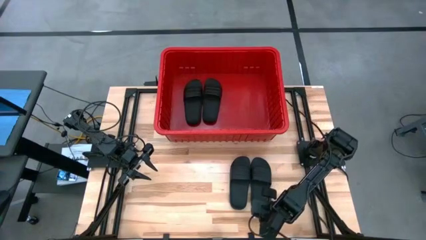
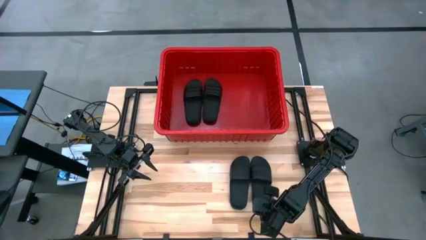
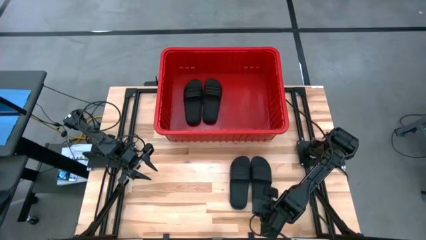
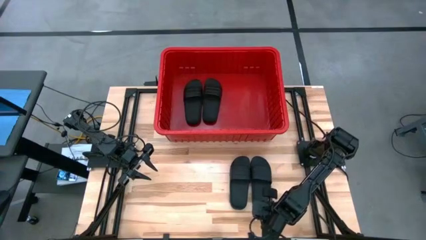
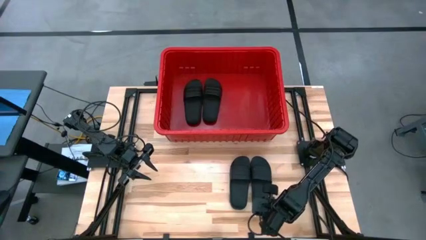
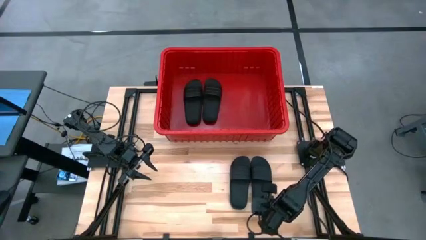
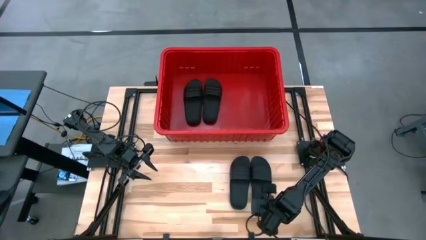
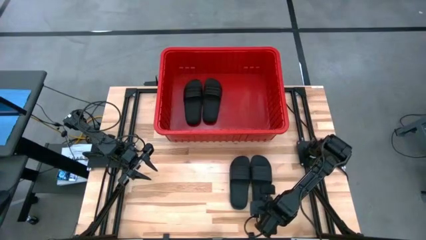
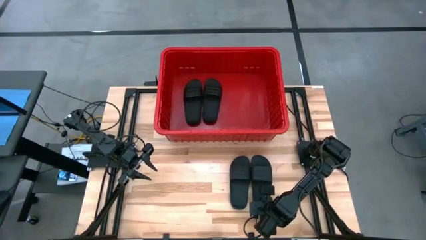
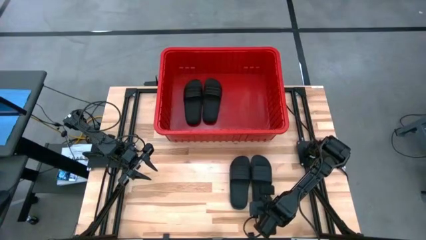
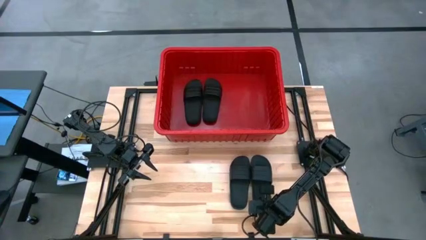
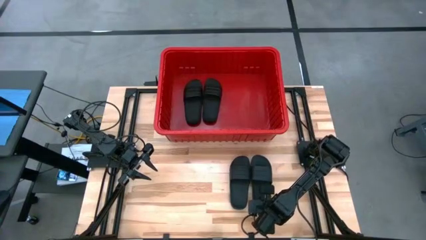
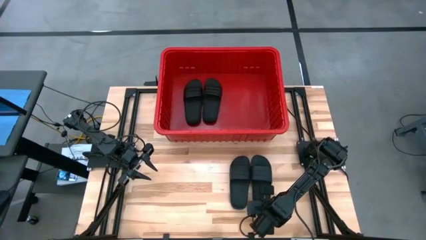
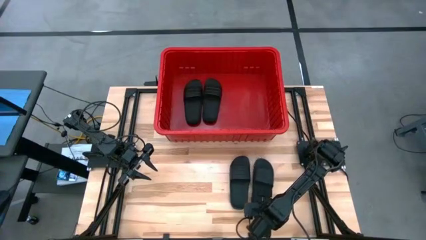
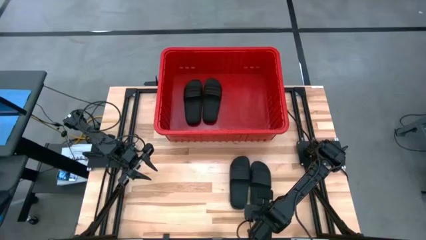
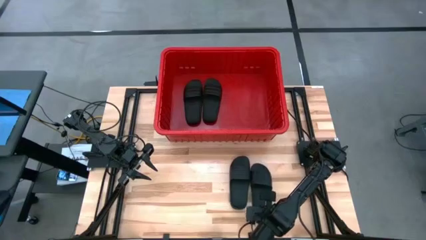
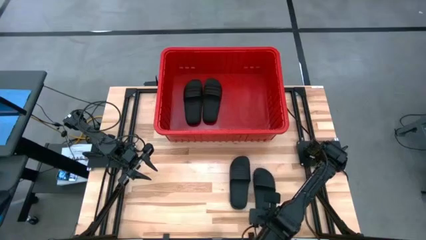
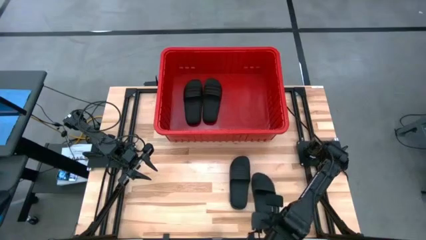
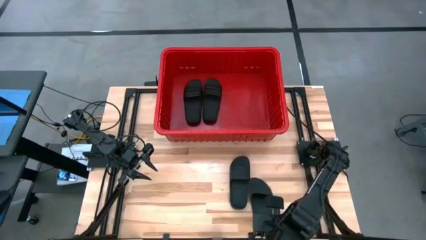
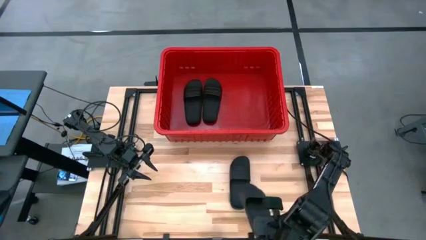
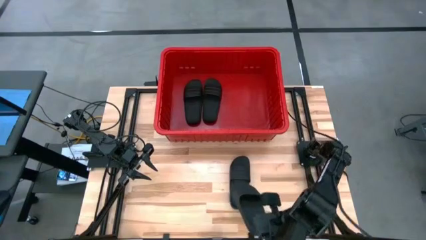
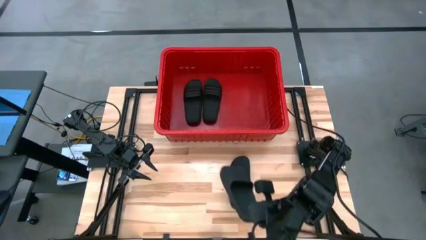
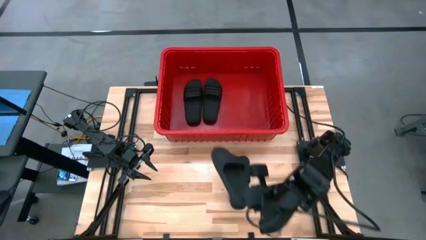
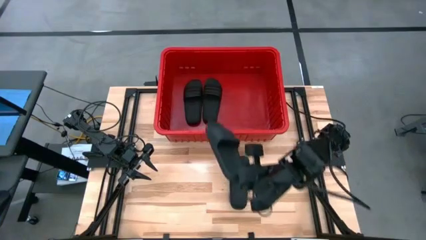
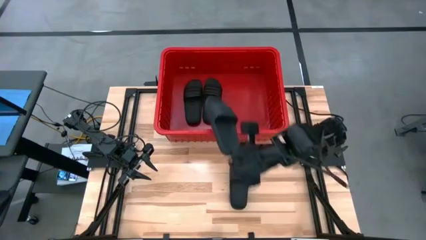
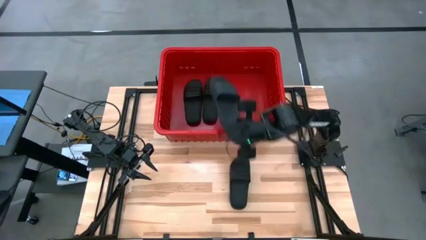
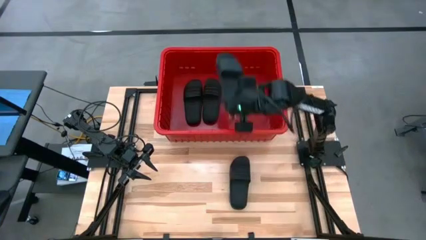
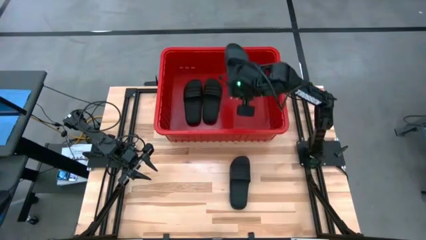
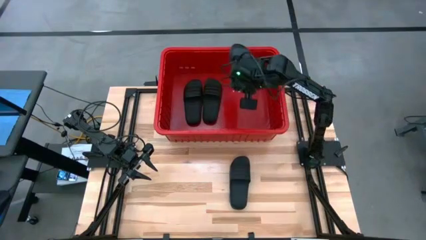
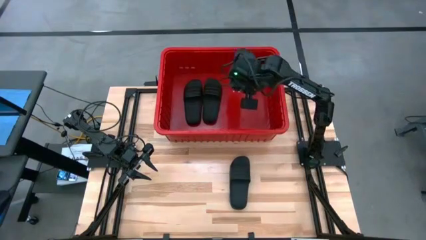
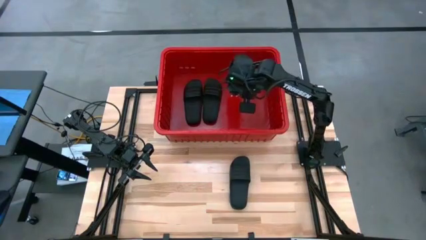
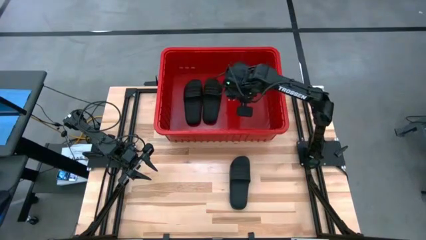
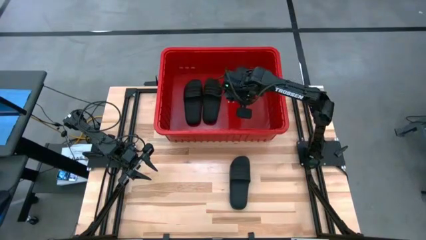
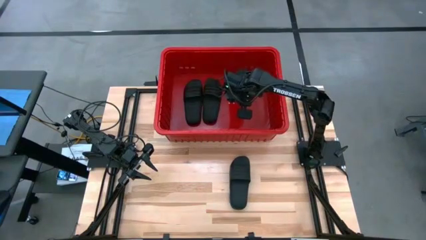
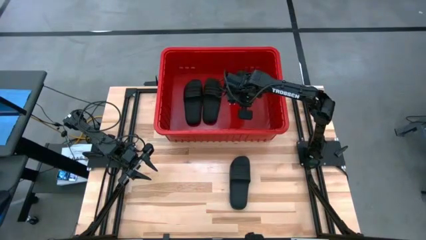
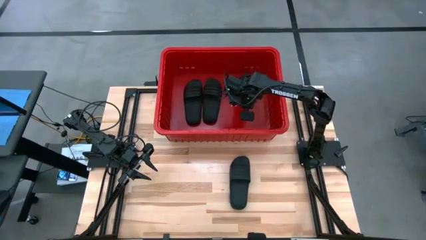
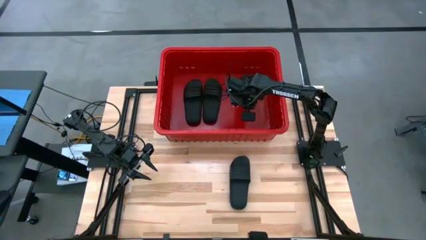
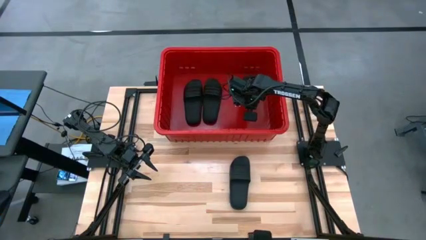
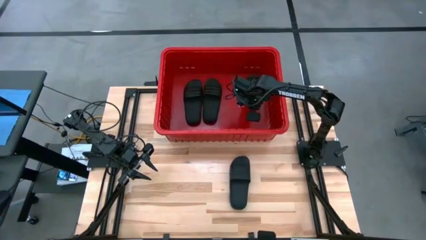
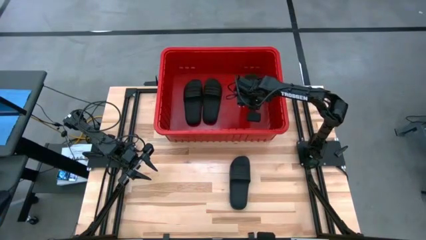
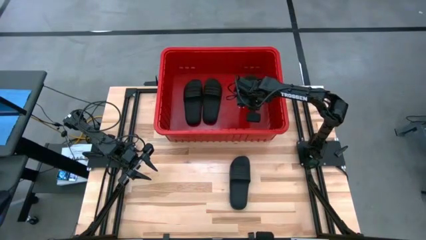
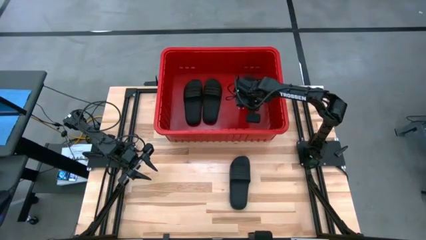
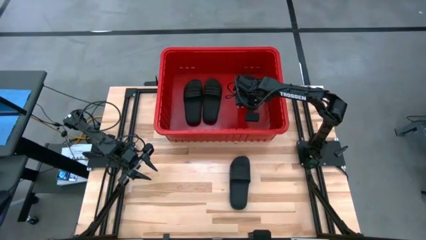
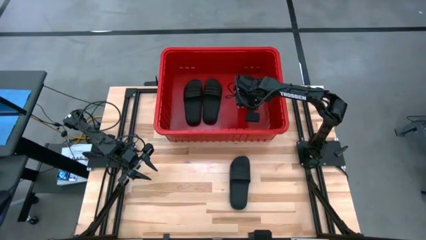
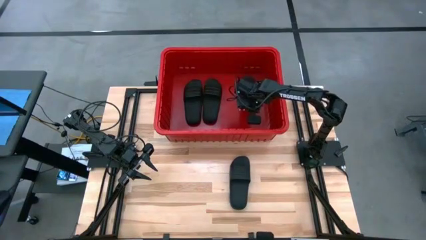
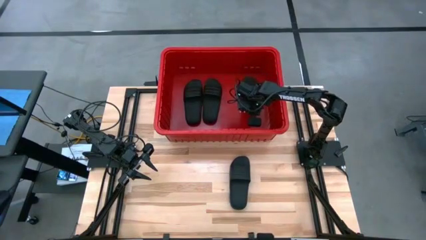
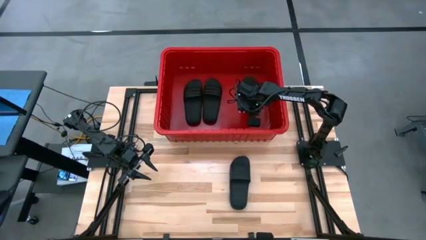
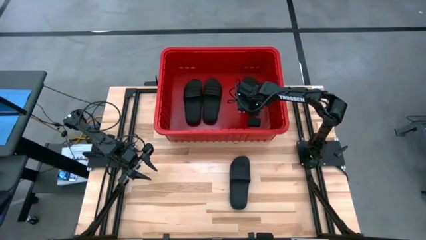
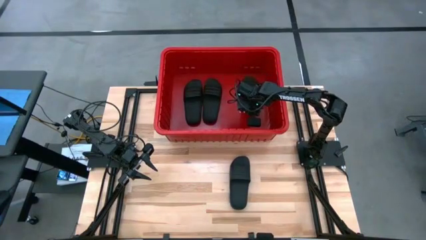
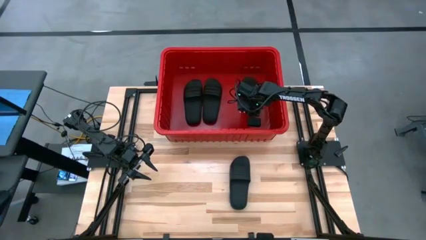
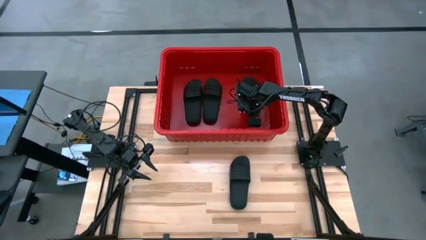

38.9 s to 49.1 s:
Task: Pick and place slides into bin
Put the black slide into the red container
